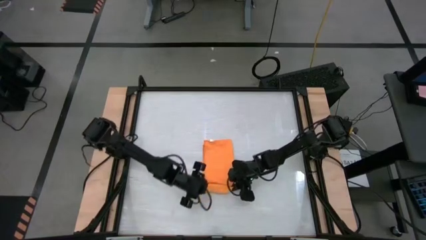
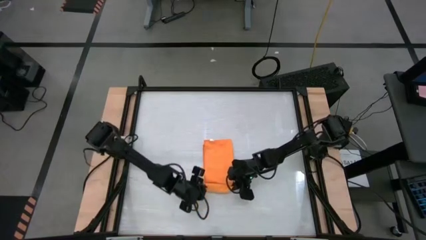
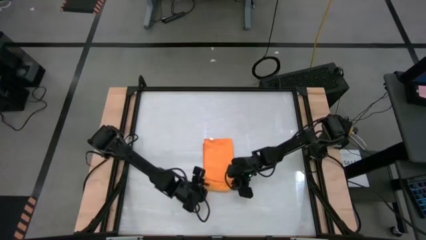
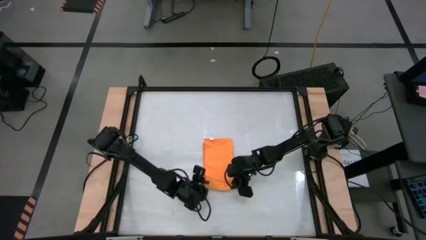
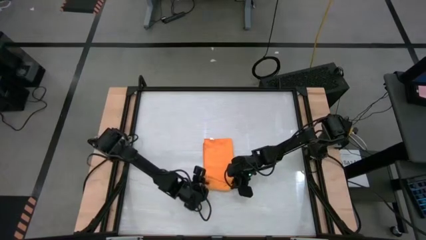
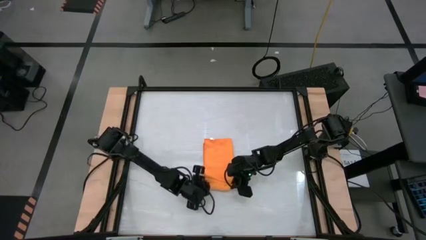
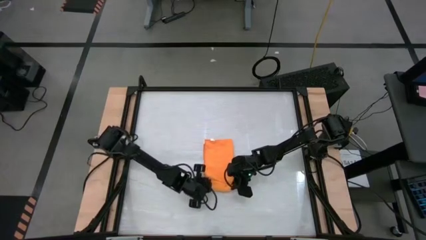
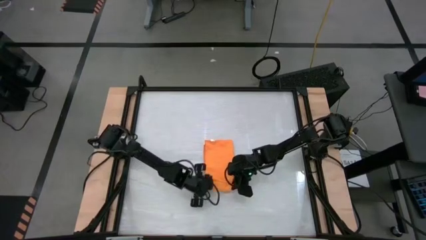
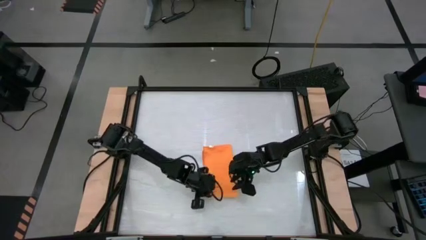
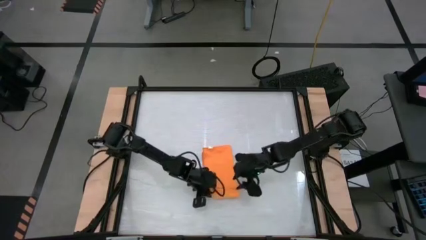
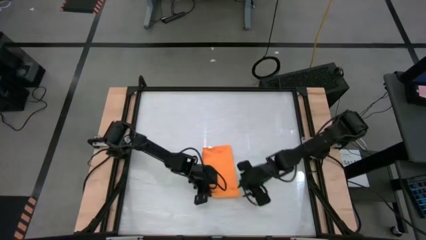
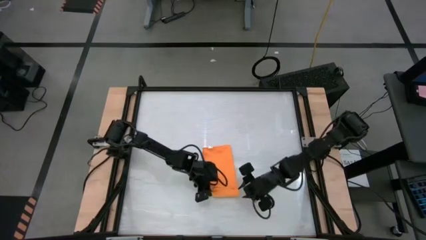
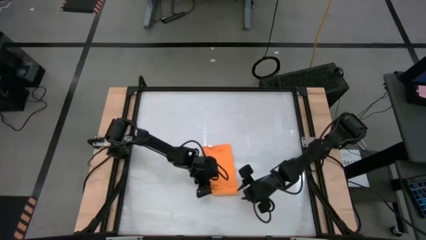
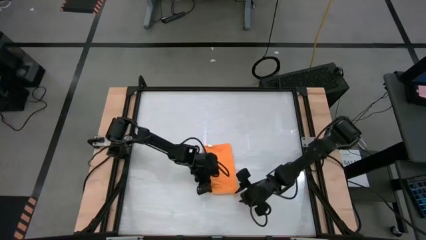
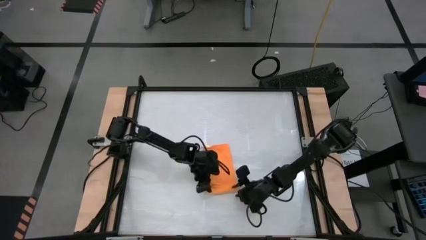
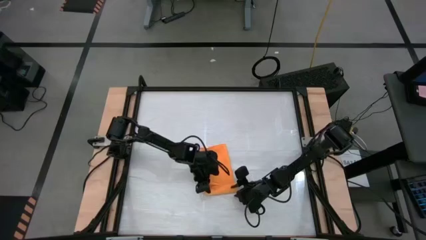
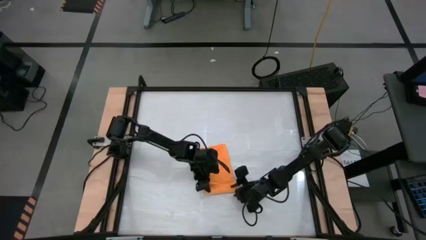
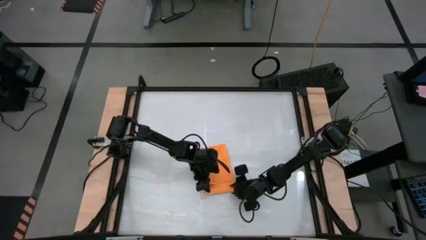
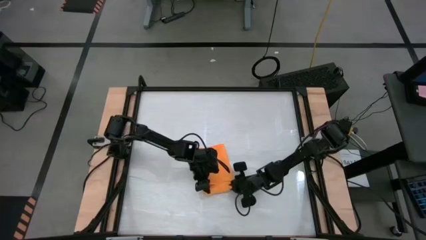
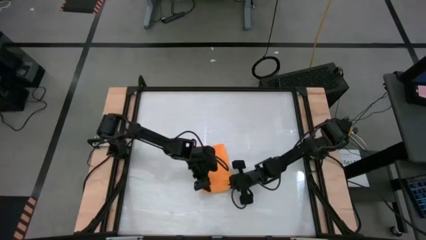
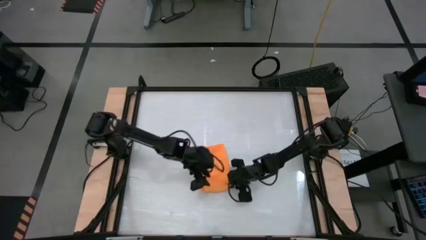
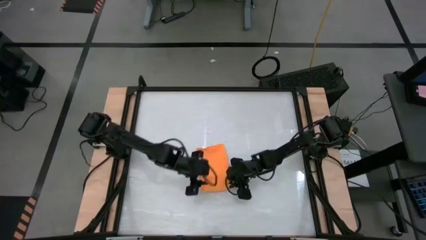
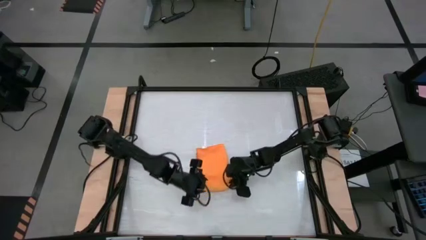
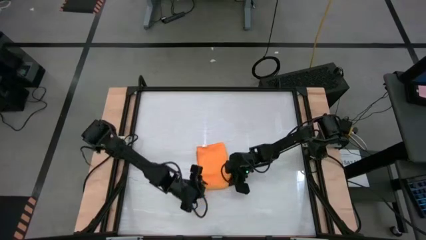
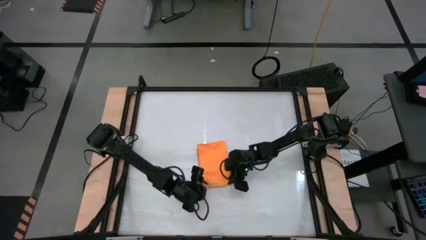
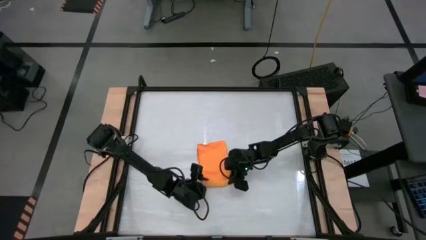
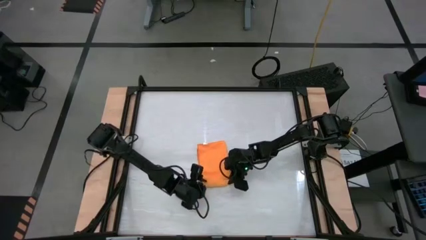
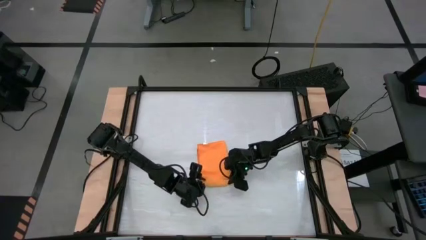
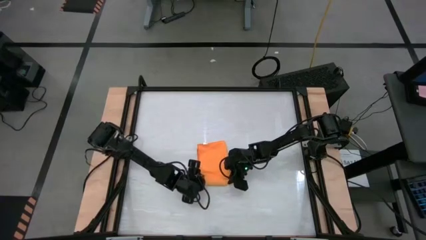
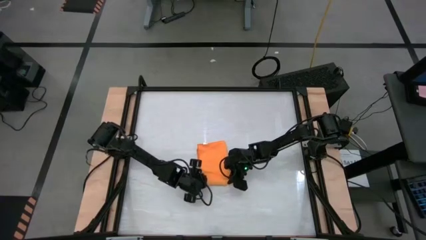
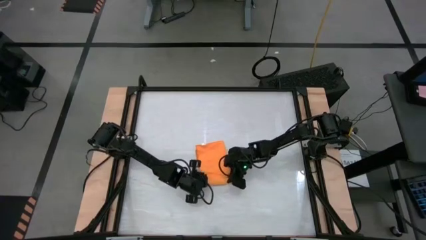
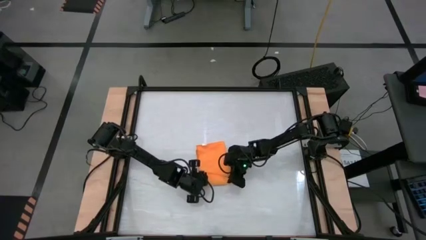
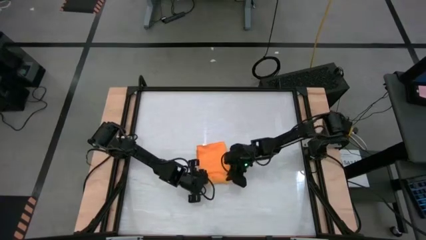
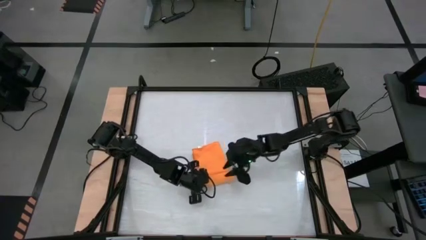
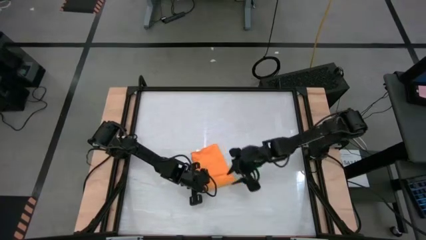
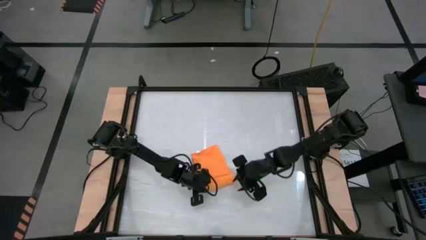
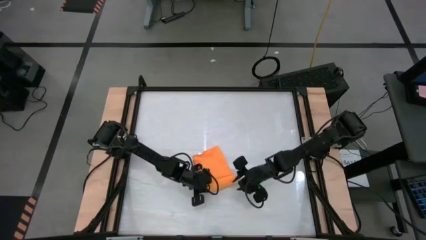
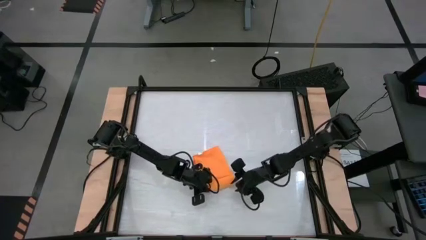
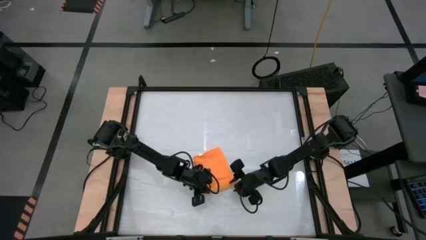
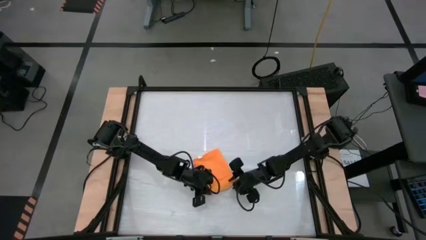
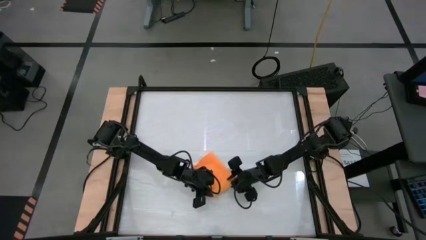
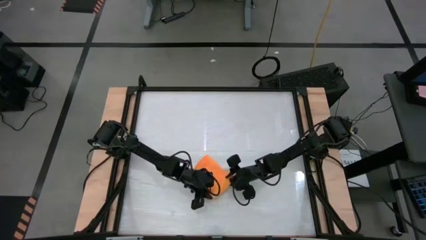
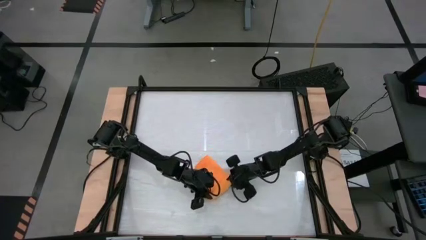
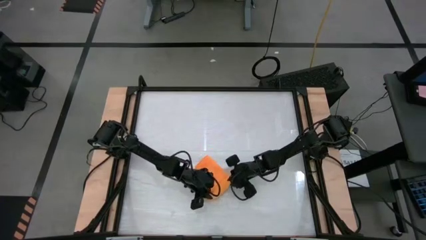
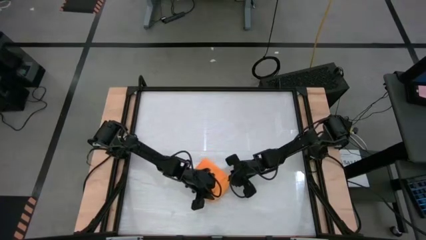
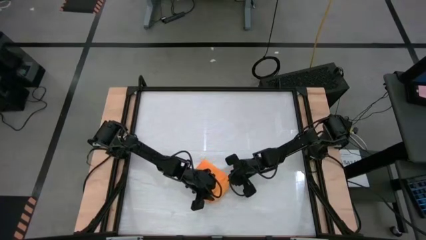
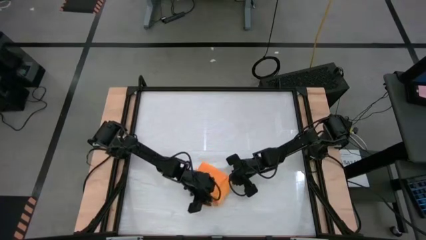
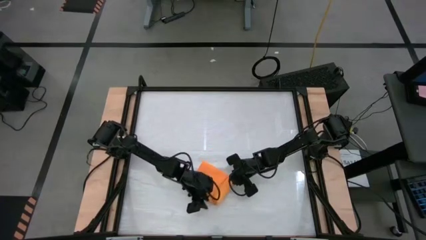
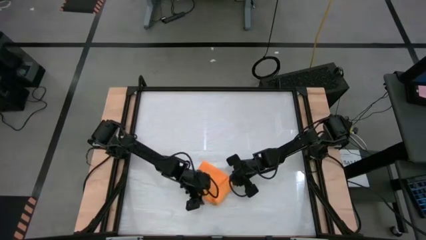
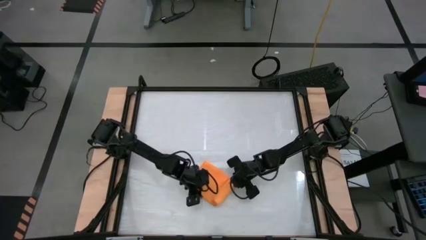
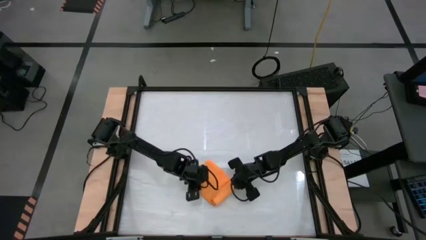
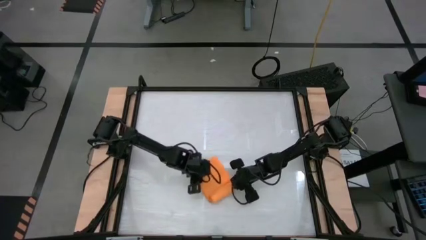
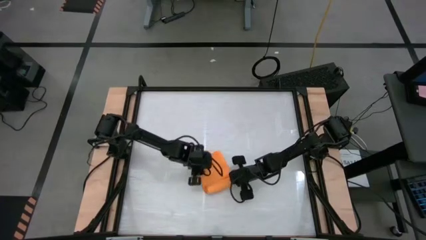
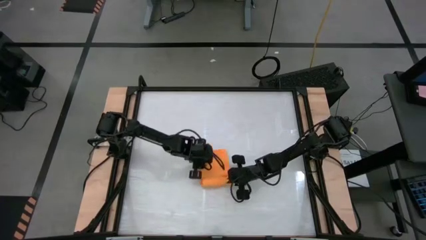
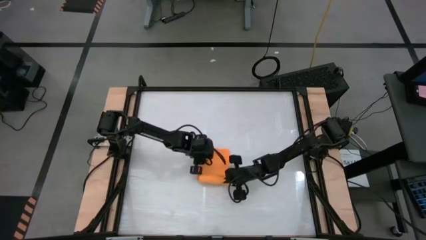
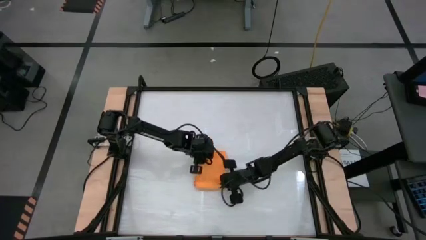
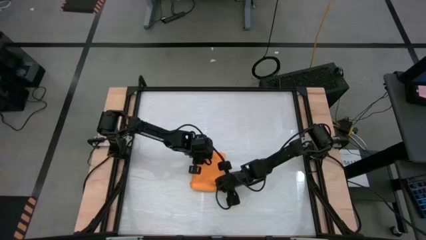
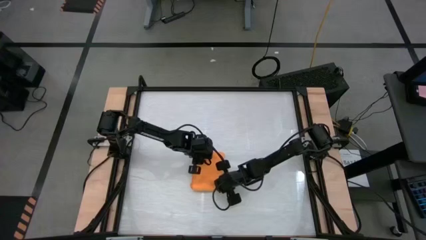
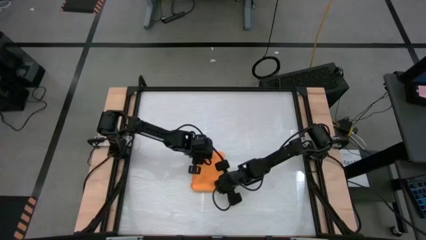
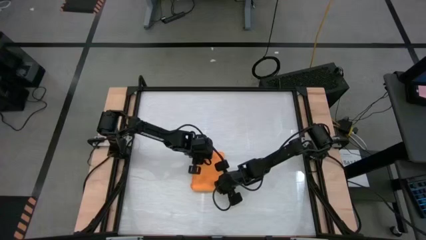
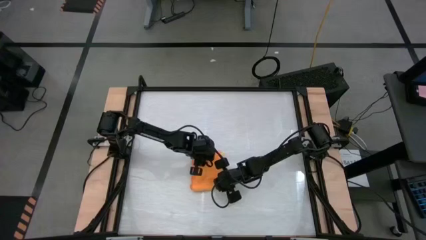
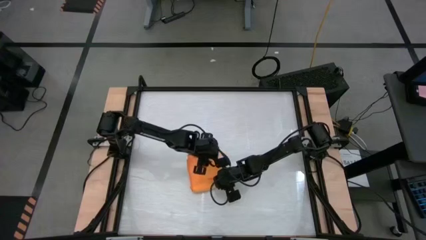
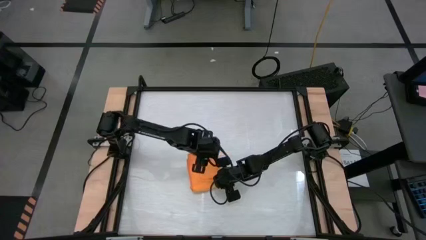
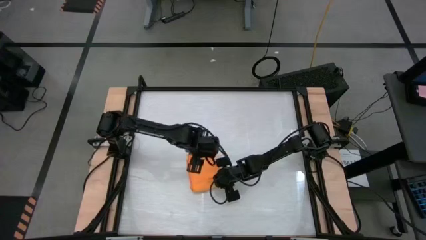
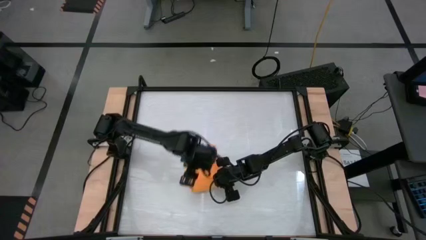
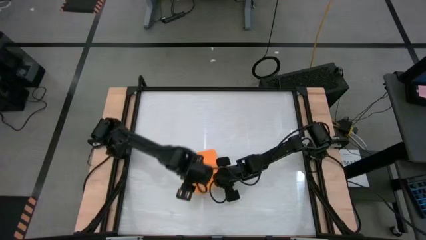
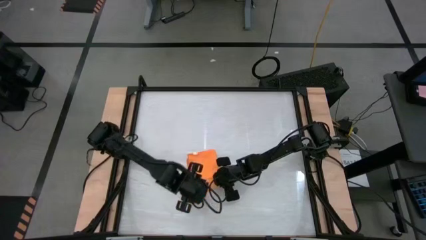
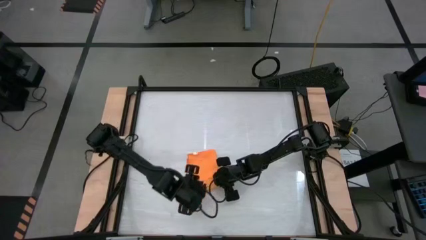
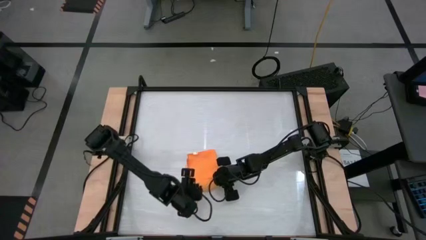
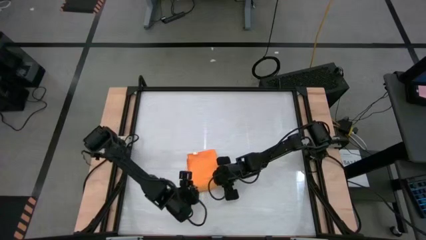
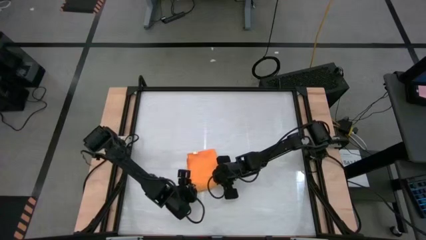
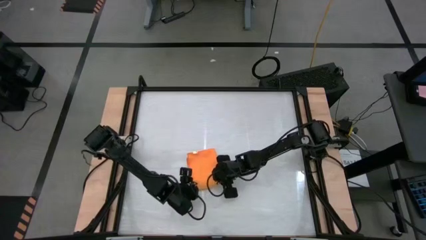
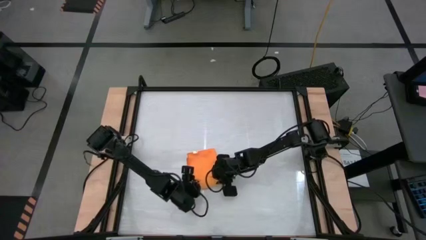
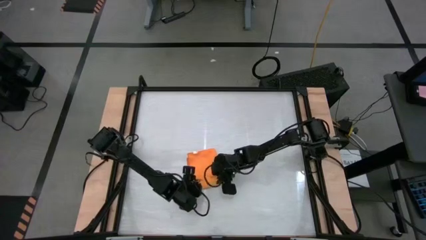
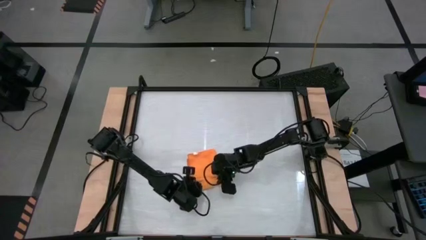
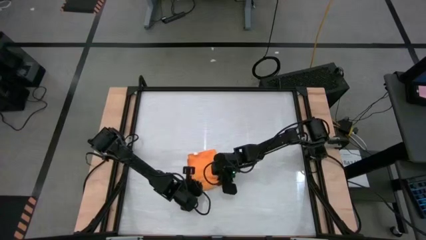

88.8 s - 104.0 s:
Task: Roll towel
Roll the orange towel
